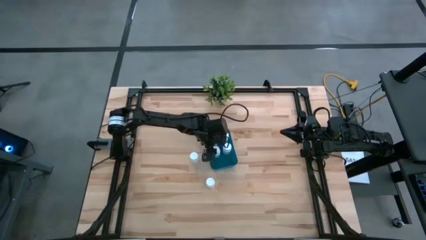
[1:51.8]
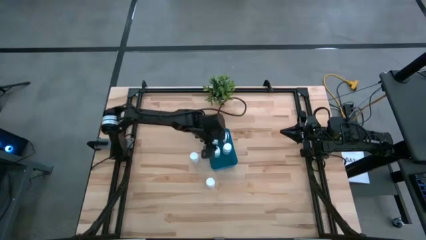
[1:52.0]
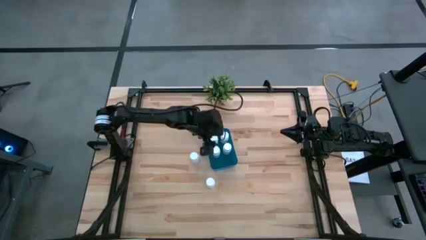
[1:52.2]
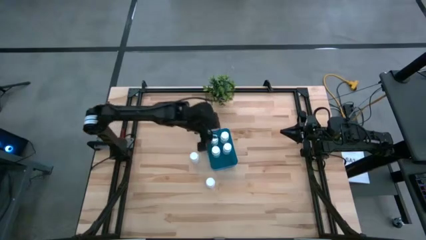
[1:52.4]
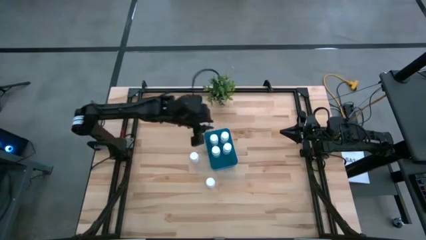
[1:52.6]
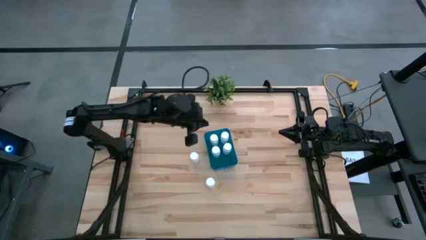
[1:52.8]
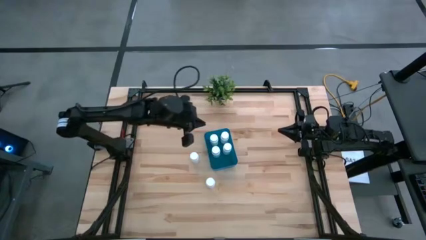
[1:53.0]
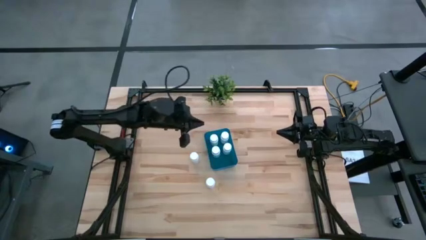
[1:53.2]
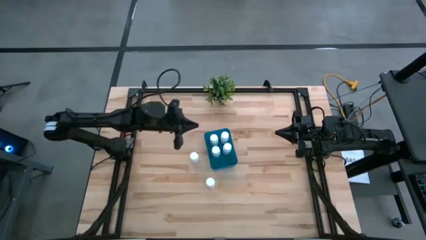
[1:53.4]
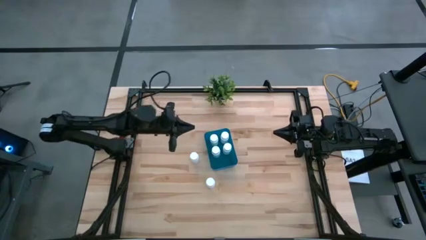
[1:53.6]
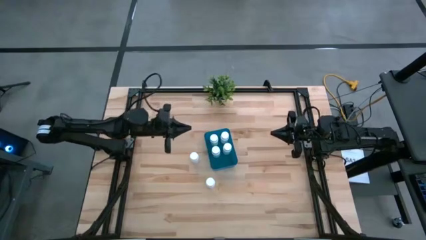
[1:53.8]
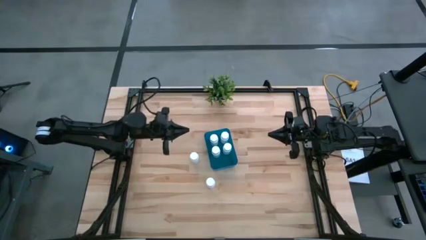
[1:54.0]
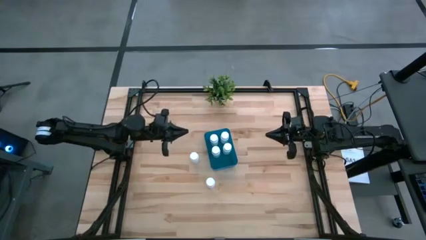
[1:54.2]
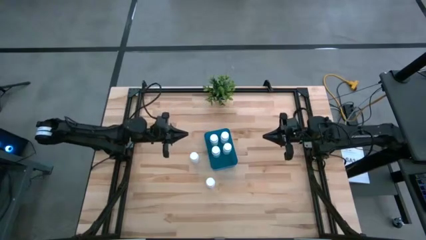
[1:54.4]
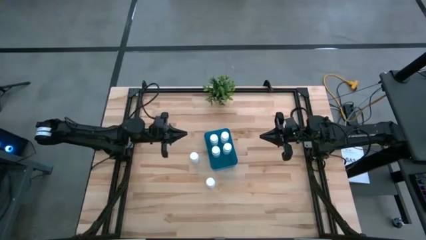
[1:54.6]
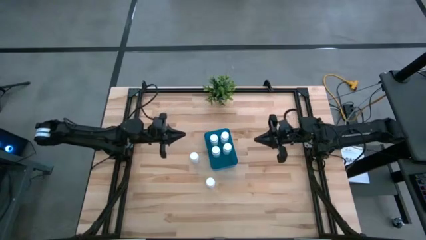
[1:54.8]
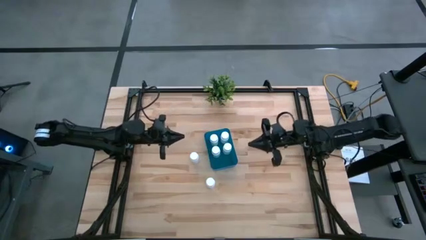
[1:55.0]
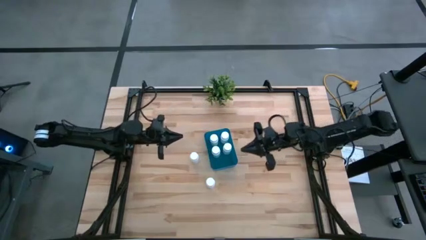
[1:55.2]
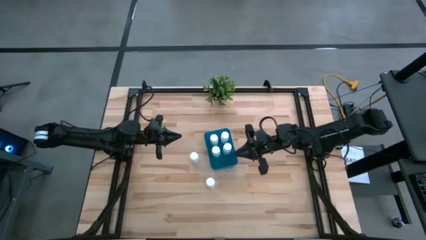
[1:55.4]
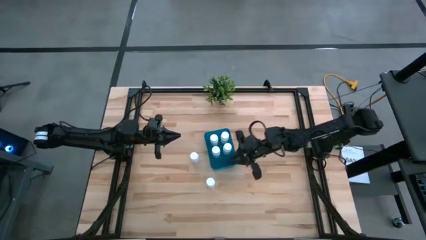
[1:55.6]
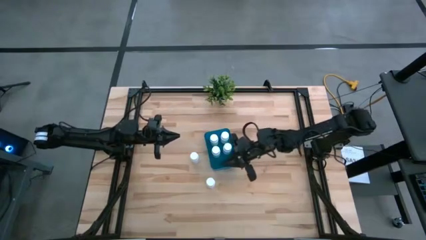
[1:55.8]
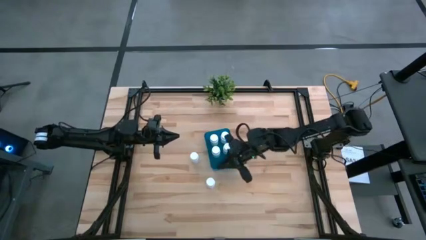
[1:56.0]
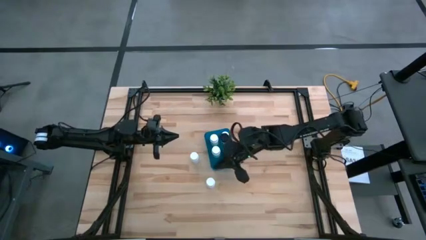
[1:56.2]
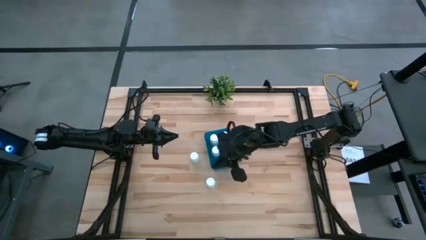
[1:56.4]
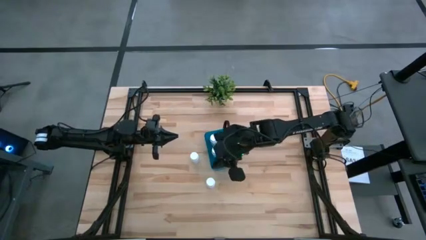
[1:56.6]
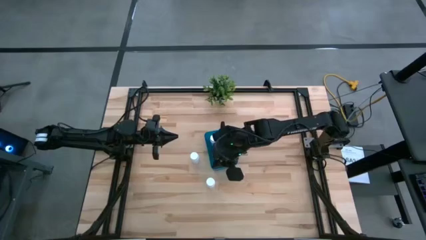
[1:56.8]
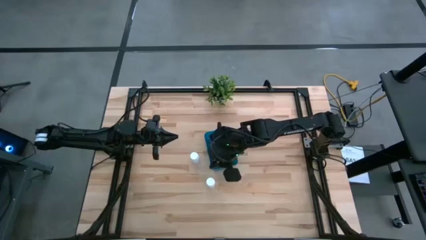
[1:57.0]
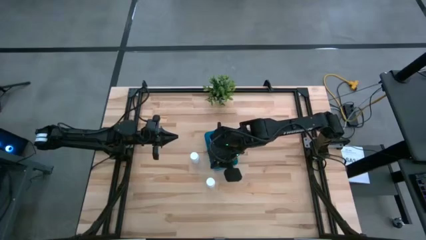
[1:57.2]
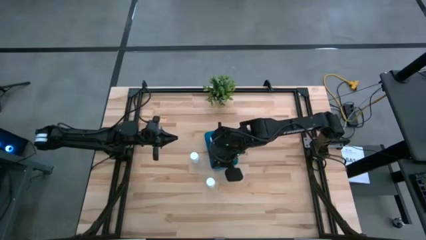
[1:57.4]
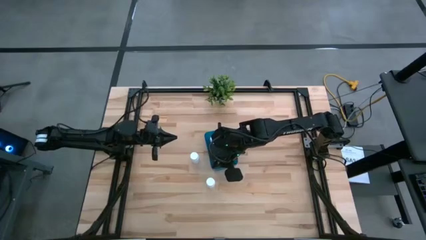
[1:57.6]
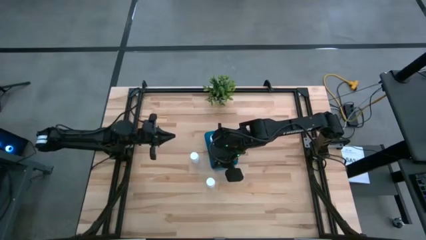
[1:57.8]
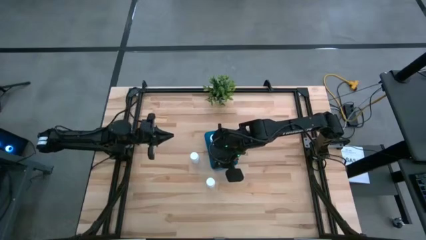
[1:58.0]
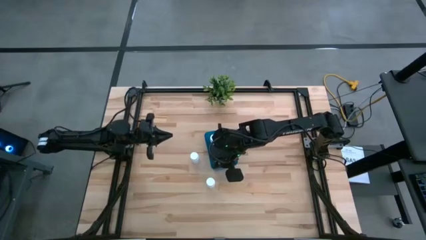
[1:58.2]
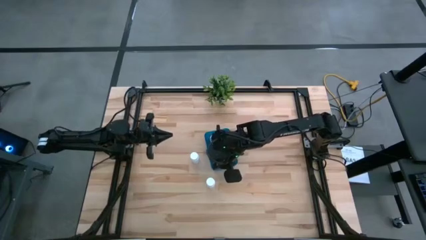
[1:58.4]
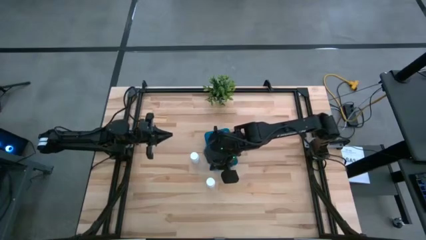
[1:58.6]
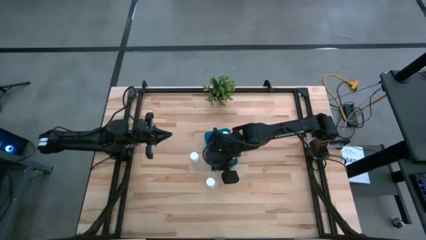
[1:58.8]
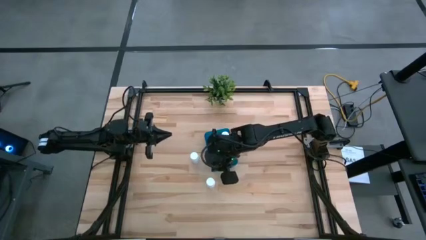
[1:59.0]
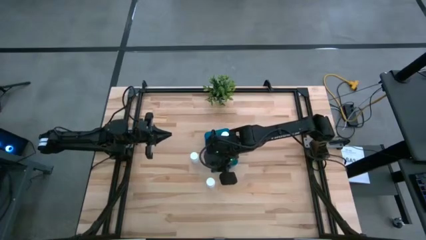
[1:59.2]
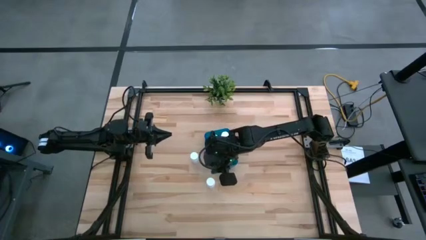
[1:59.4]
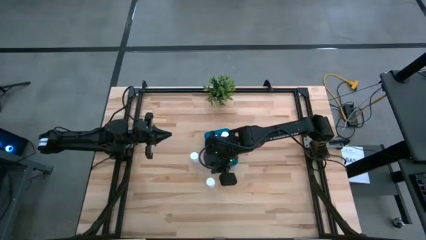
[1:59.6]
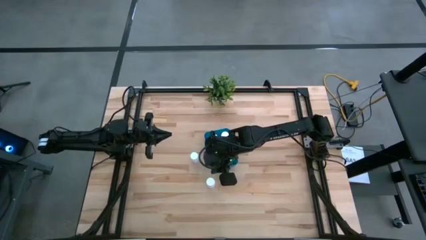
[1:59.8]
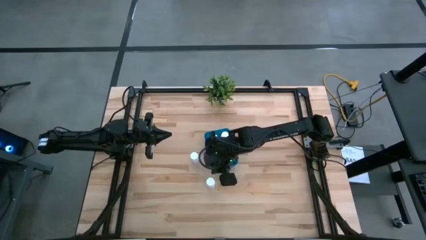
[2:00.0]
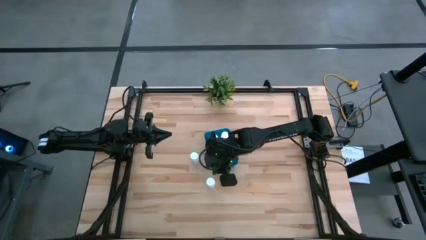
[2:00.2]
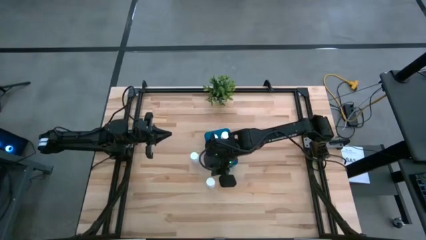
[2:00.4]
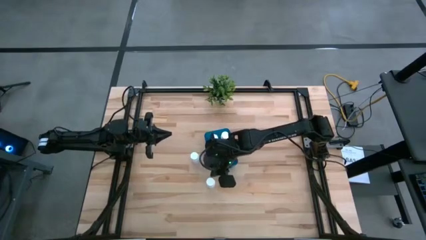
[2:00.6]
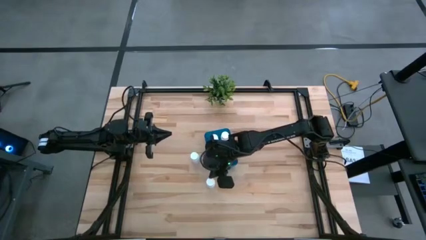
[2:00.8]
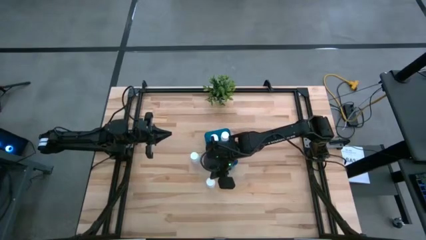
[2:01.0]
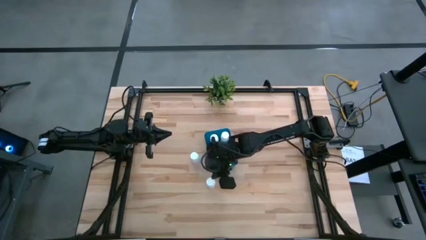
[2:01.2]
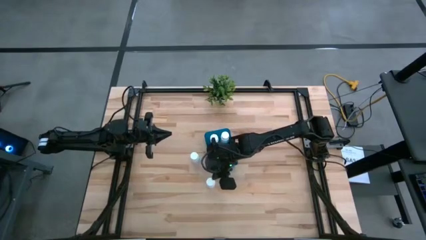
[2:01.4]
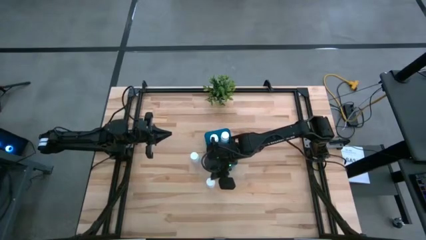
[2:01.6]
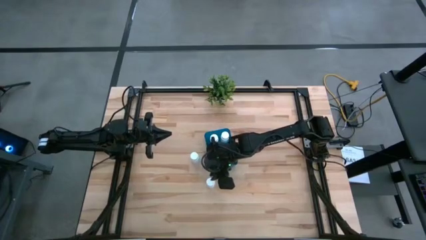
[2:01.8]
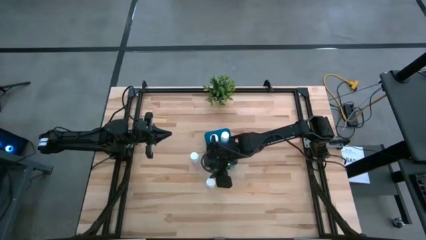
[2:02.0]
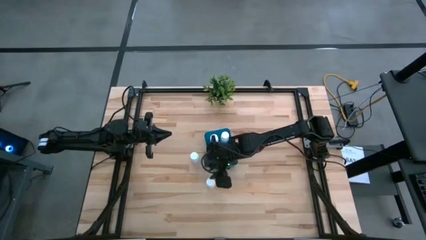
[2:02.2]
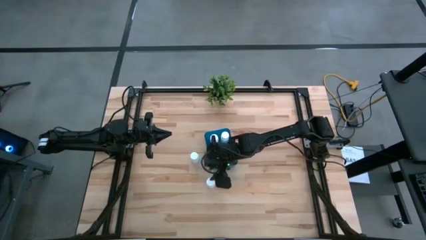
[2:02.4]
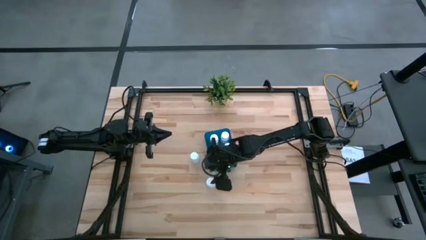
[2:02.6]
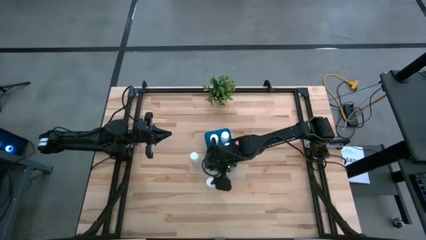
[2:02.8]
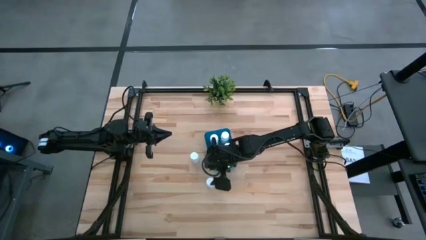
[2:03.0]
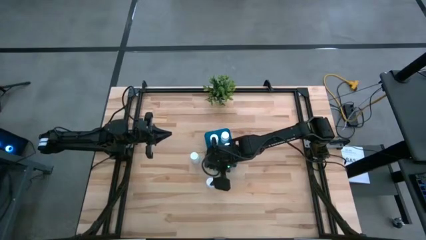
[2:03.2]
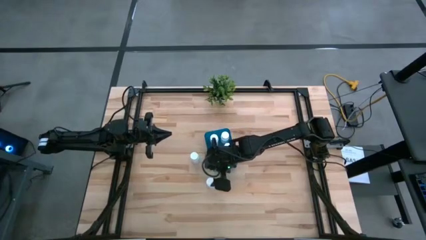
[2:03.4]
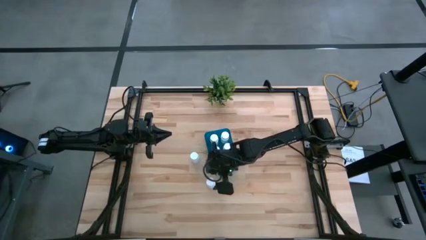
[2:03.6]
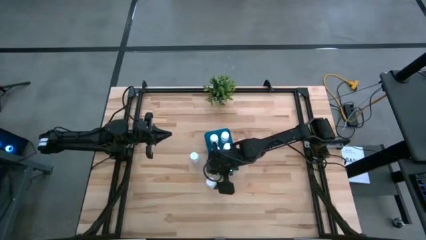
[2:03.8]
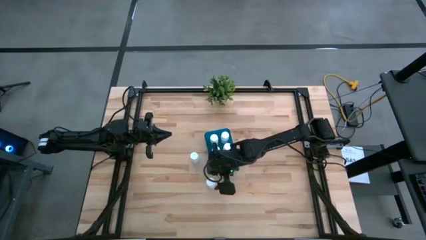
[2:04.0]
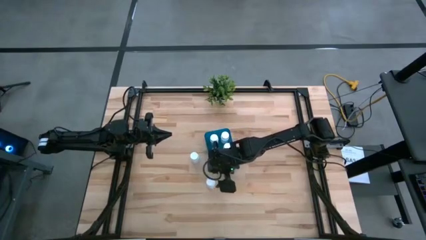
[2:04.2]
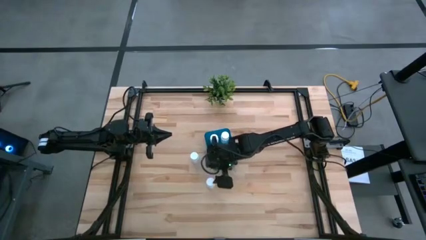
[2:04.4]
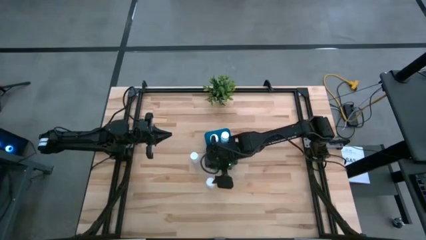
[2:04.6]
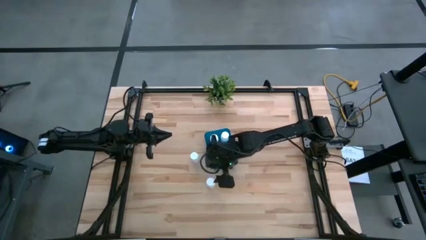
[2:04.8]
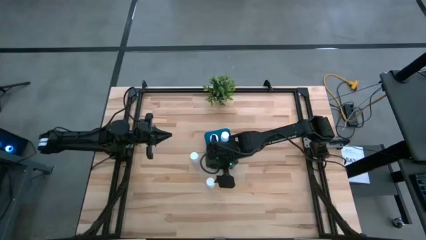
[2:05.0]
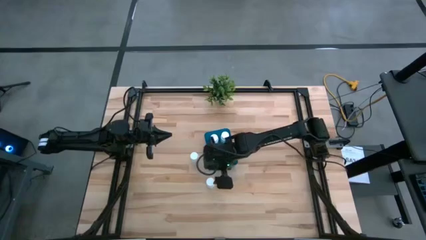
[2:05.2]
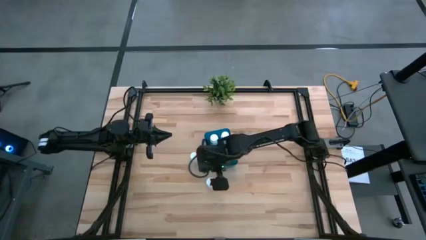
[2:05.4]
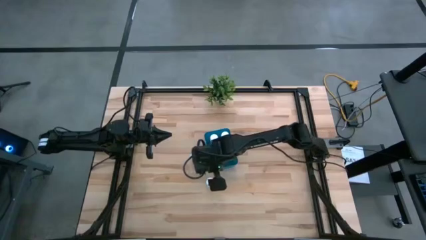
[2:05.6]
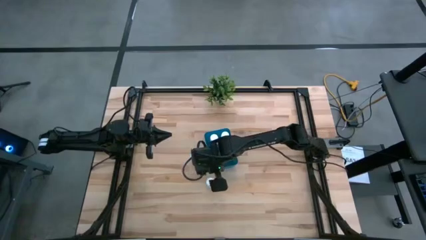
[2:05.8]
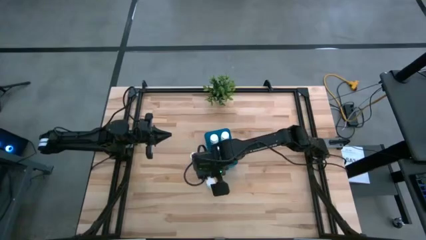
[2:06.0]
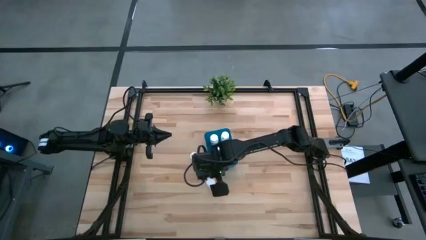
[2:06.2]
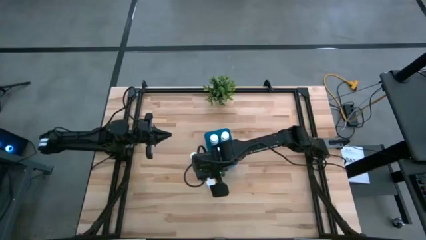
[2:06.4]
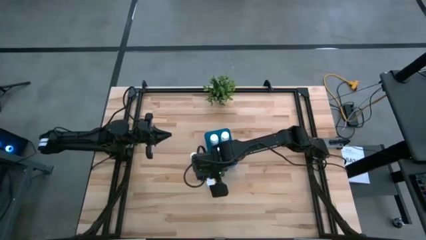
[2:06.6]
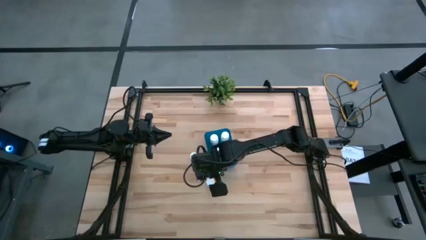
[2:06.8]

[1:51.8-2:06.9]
Task: Pick and place pill bottles into a basket
Put the bottom white medicine bottle into the blue bin
